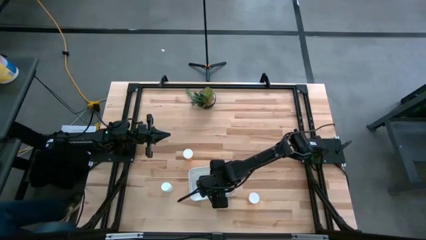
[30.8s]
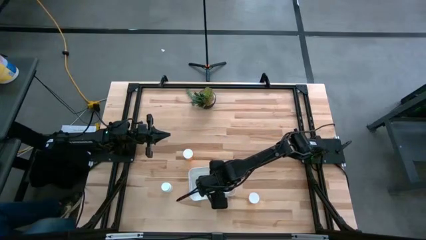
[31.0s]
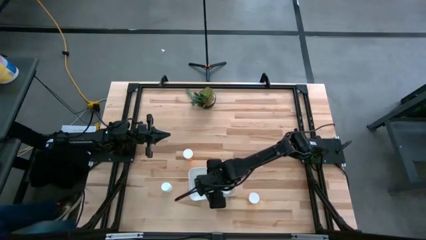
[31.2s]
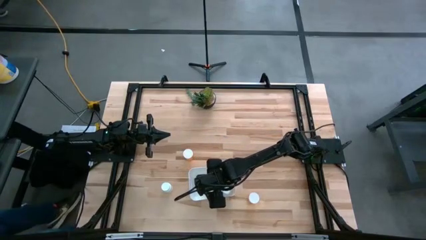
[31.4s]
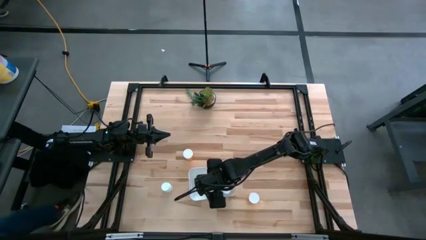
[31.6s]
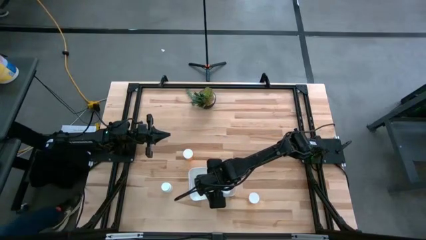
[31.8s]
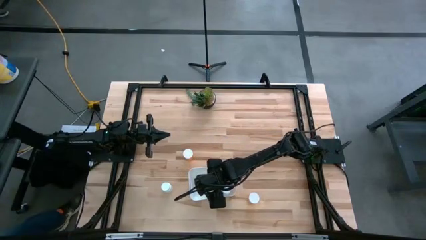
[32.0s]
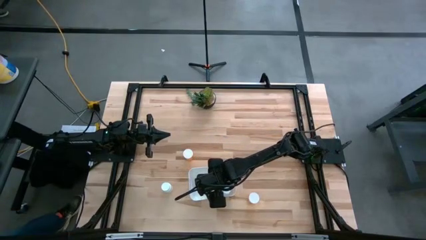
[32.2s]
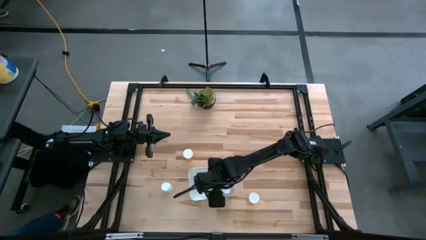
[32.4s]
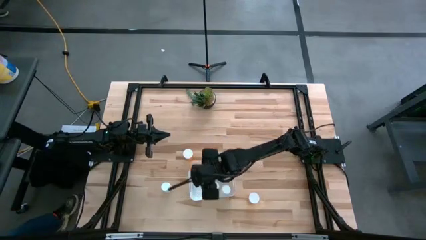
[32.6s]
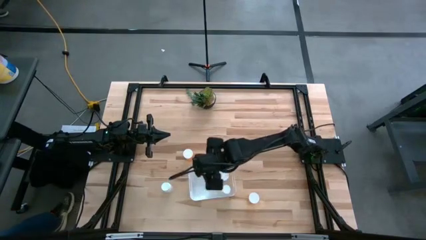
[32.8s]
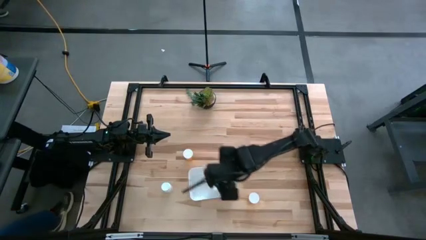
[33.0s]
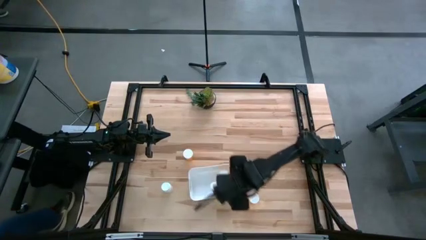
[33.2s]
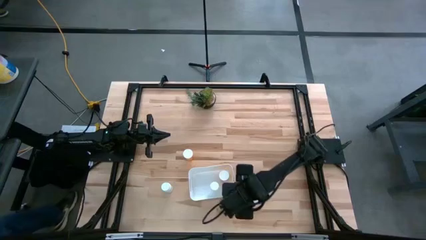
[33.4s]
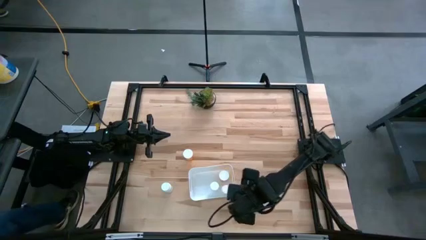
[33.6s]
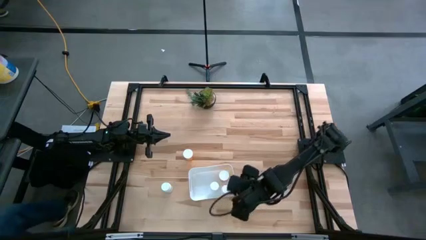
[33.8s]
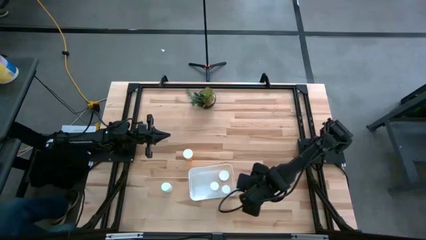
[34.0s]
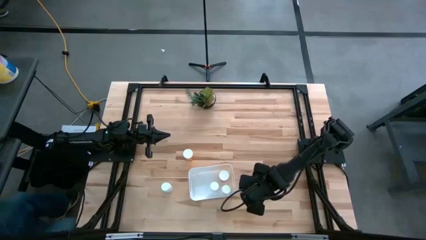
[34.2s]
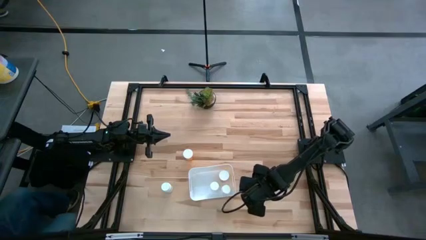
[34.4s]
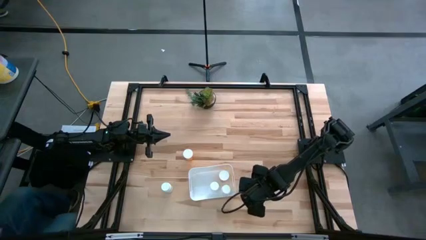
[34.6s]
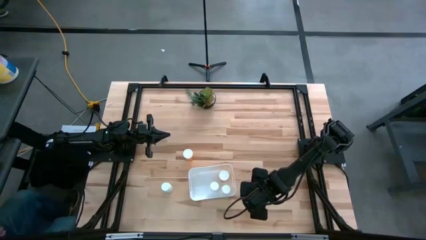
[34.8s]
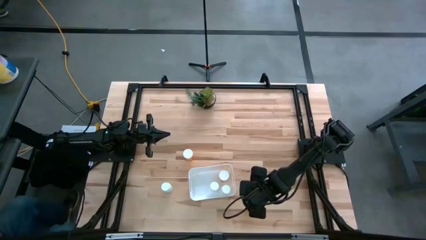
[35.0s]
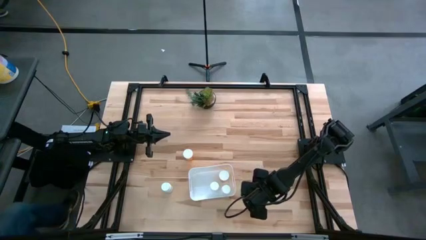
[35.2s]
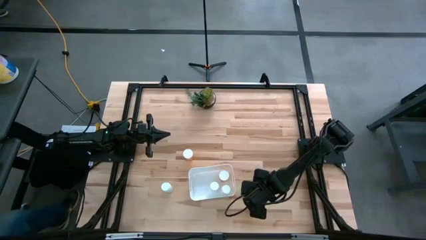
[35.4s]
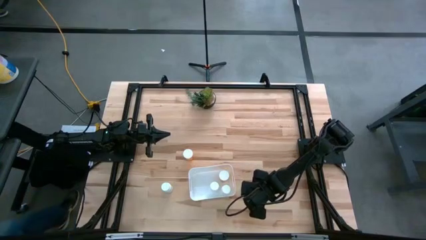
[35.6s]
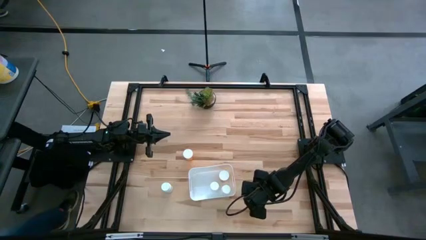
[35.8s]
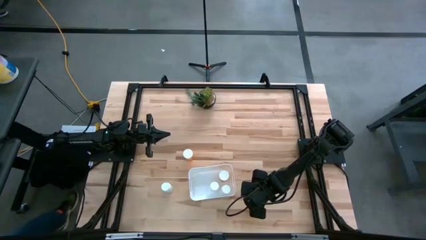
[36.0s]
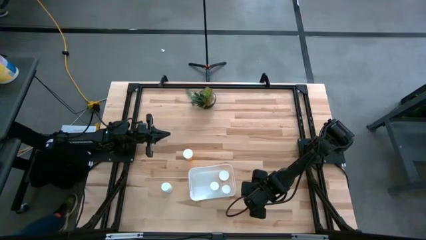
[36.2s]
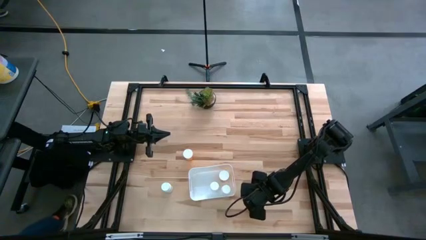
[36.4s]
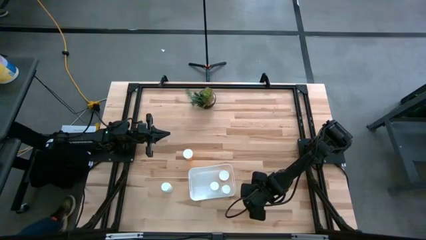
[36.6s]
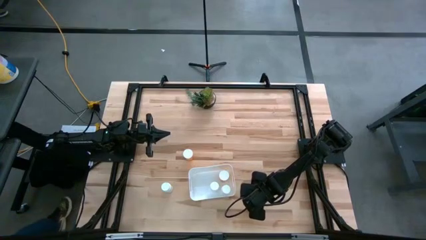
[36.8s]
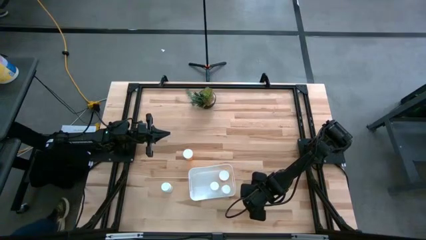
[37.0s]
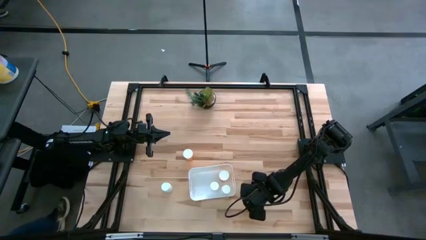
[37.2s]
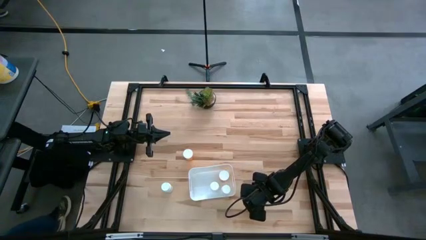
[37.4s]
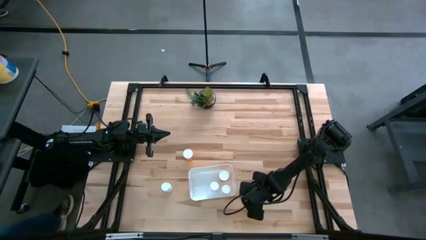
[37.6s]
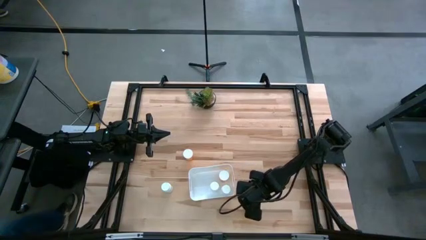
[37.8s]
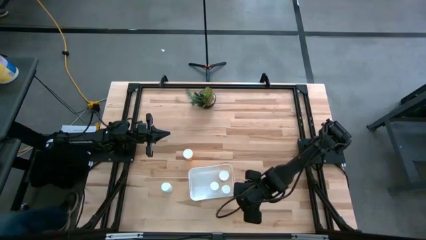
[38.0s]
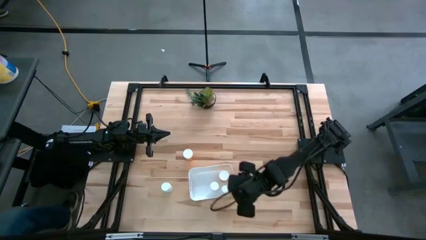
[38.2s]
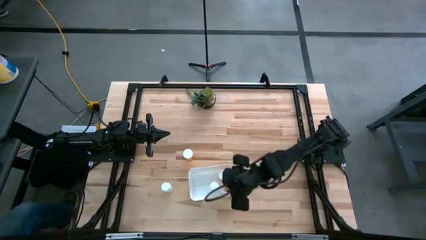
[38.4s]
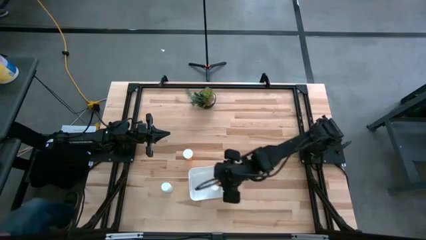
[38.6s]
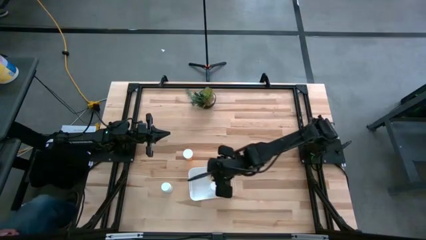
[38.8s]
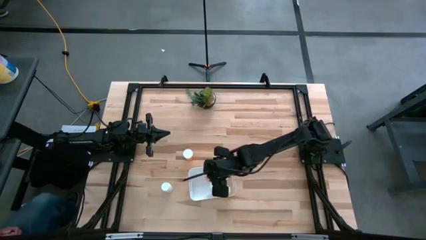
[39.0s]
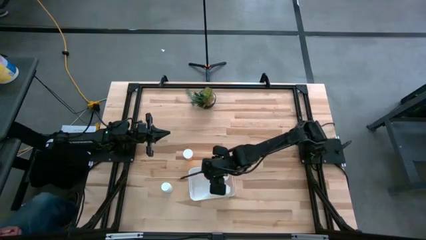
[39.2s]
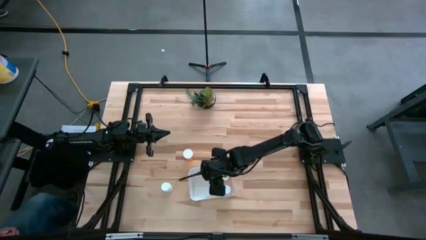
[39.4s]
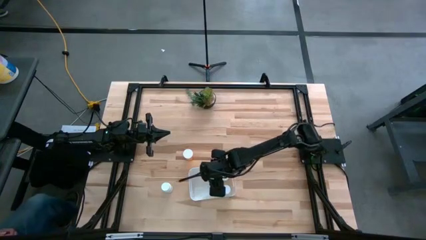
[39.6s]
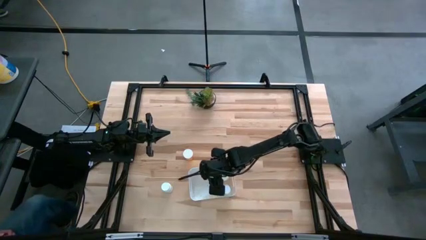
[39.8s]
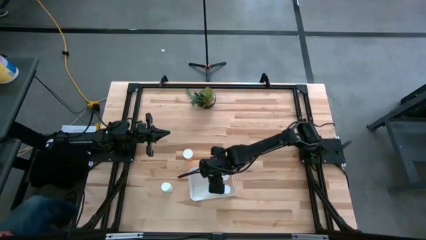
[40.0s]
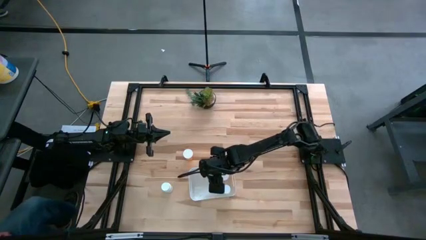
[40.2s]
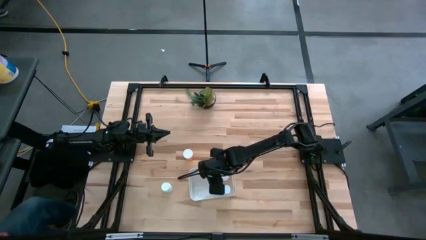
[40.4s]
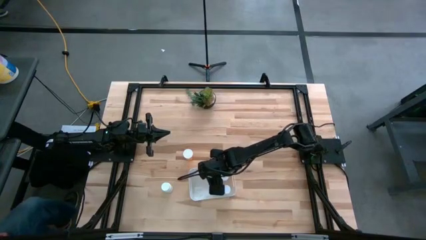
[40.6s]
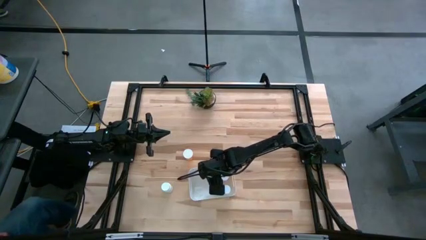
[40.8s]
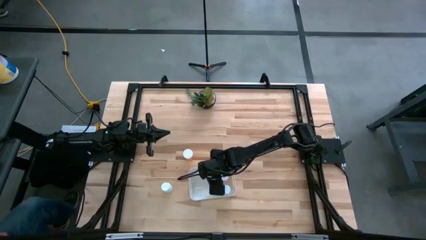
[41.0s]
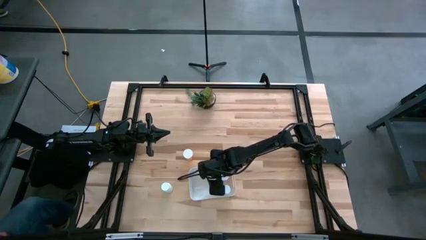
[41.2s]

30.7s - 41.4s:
Task: Pick and place pill bottles into a basket
Put the right orange pill bottle into the white bin

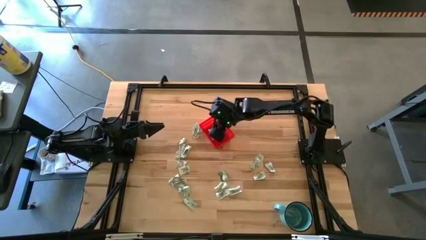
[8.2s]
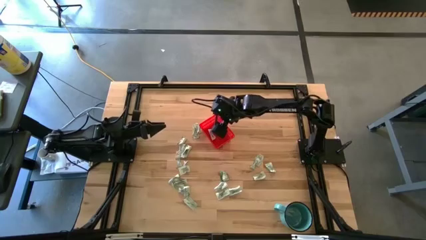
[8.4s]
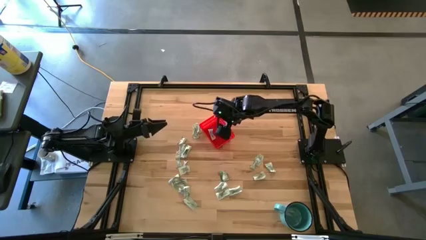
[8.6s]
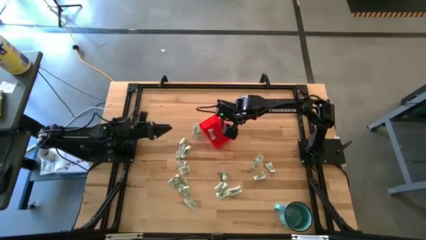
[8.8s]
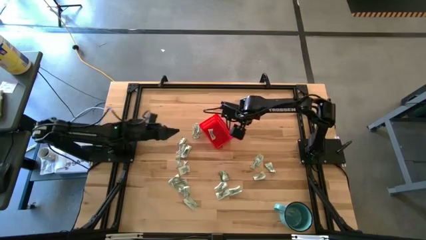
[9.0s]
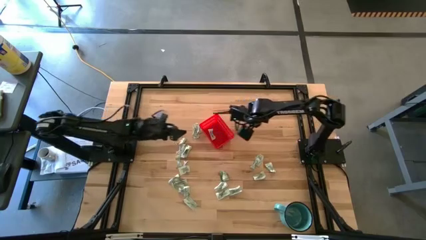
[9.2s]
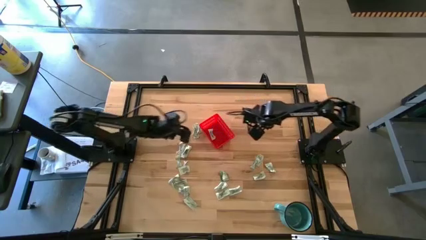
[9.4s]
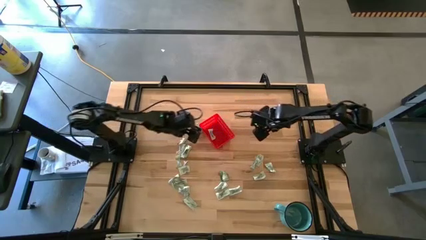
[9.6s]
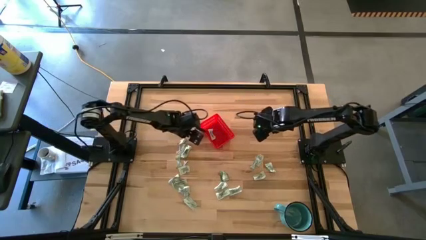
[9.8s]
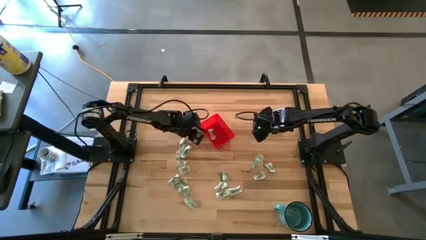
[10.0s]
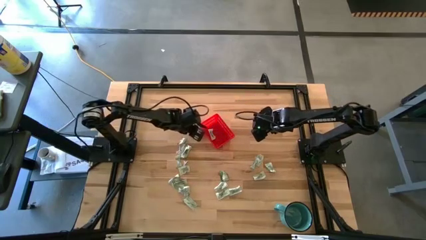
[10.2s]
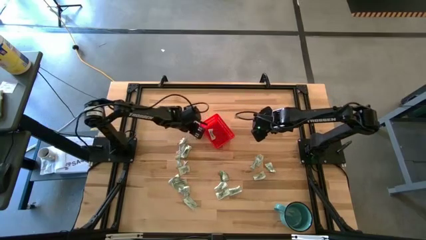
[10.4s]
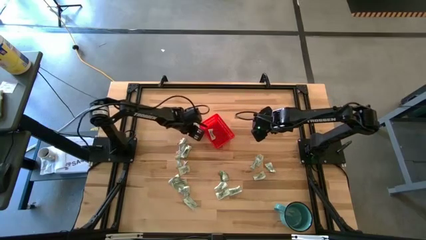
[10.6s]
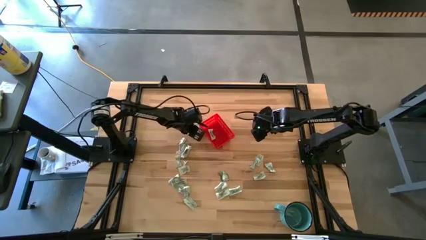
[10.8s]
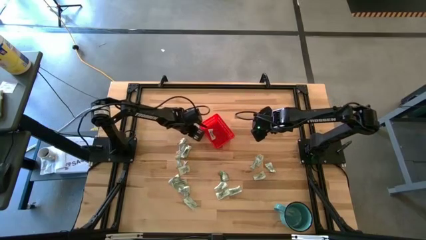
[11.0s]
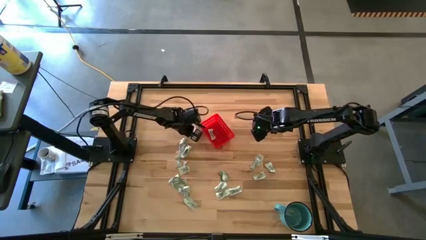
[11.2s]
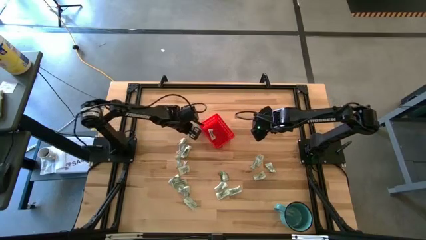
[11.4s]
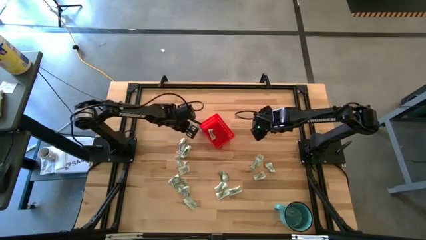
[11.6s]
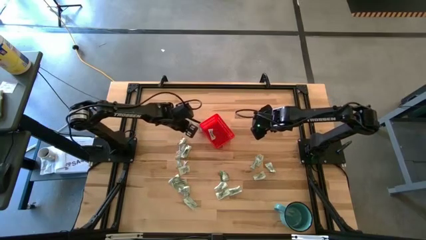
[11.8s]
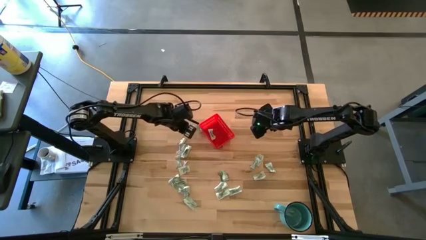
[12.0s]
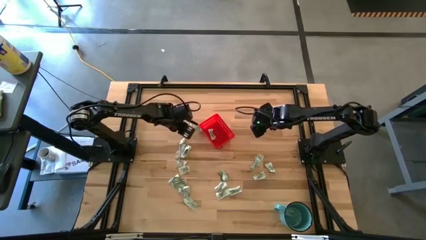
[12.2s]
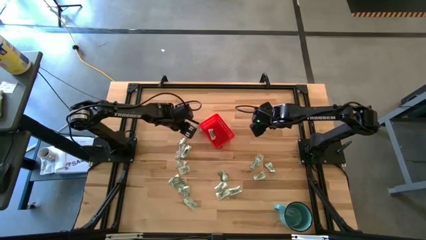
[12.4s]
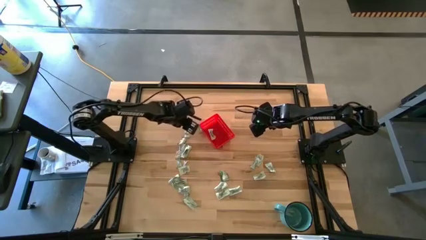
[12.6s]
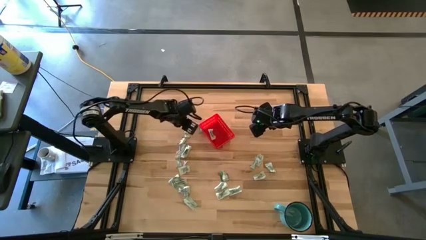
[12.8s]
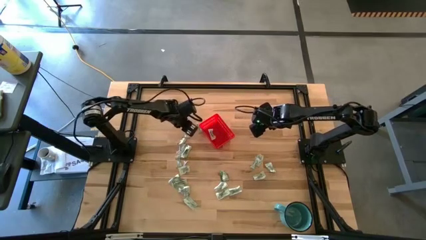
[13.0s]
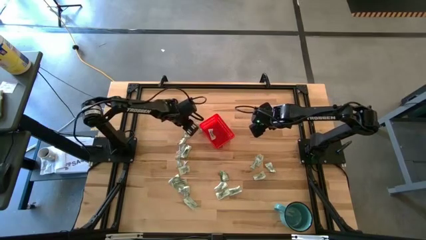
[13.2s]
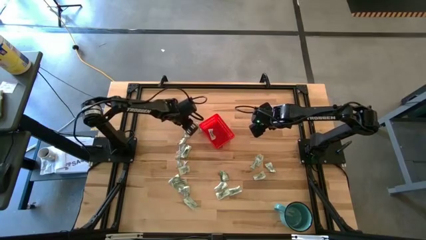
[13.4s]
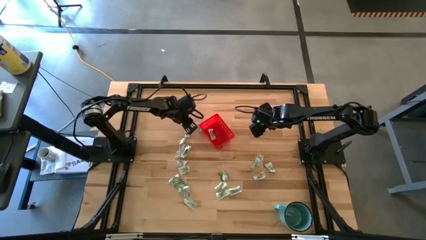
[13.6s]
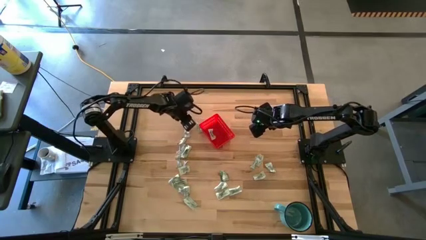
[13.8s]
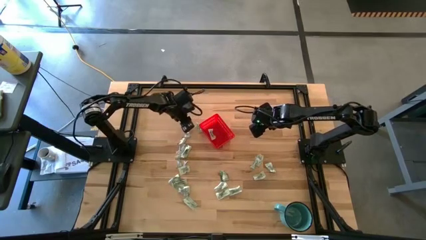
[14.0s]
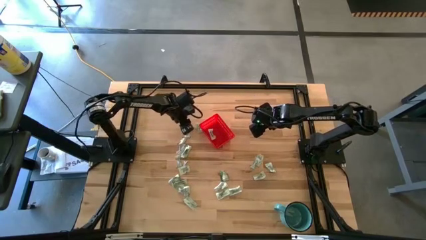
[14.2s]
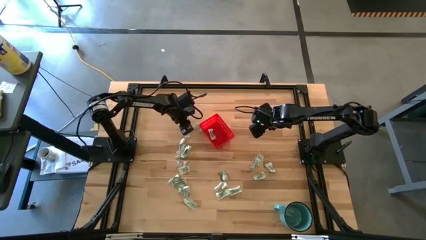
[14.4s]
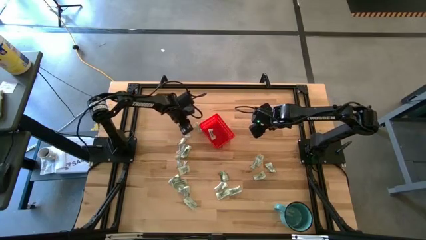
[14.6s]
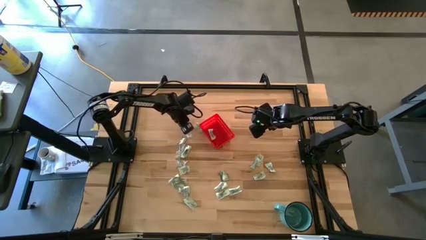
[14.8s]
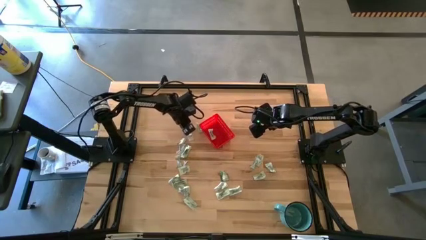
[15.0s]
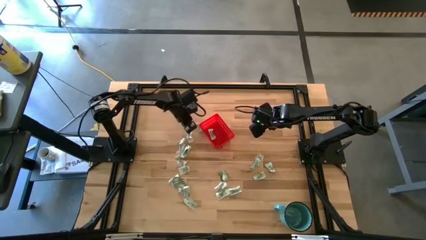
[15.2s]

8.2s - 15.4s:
Task: Pick and place Stevia / Truvia into bins
Put the stevia packet into the red basket
